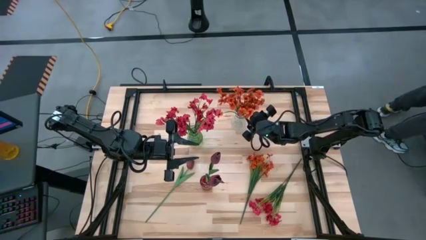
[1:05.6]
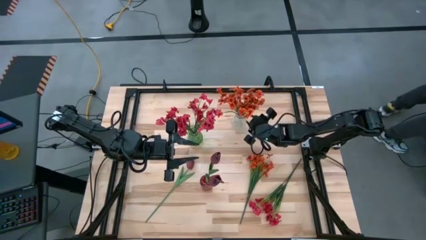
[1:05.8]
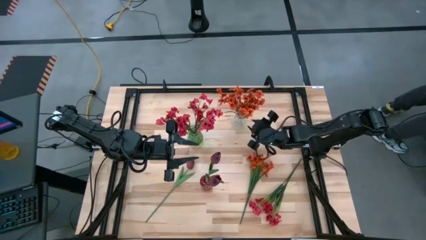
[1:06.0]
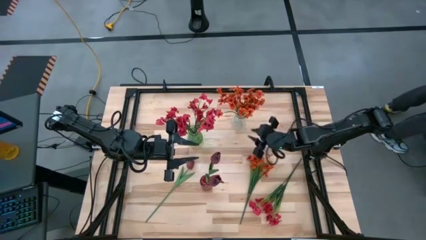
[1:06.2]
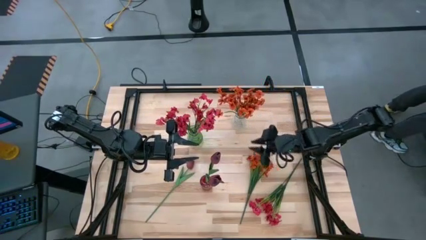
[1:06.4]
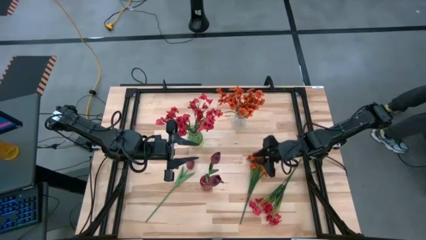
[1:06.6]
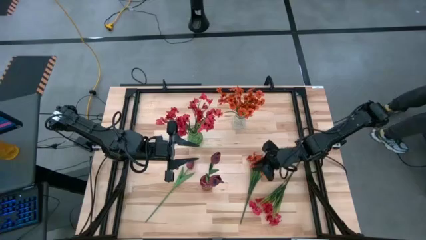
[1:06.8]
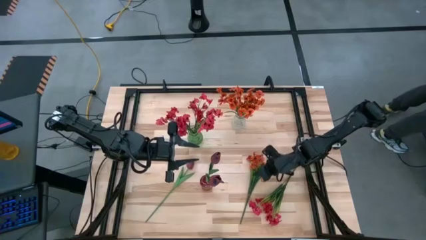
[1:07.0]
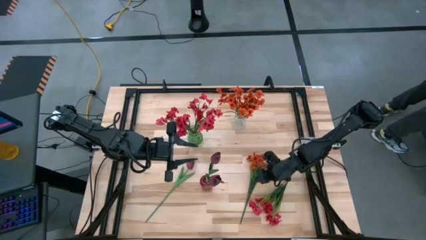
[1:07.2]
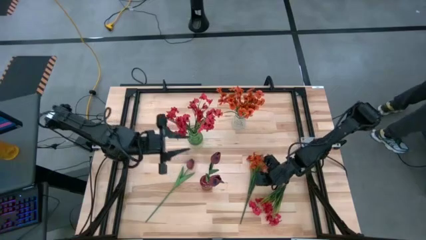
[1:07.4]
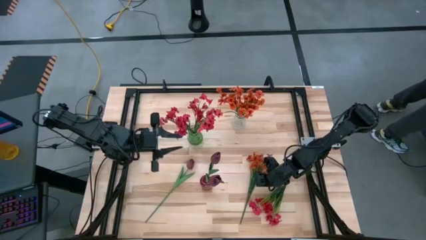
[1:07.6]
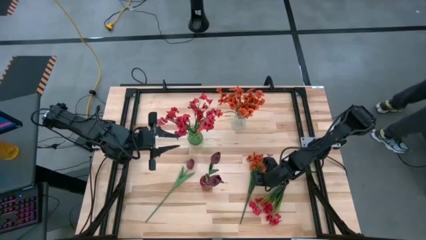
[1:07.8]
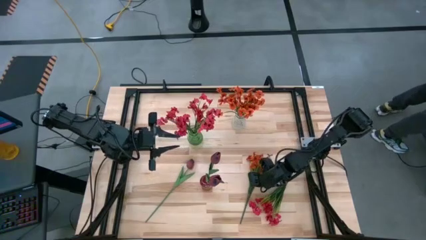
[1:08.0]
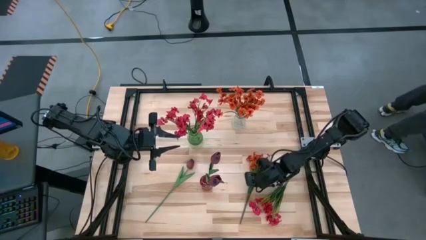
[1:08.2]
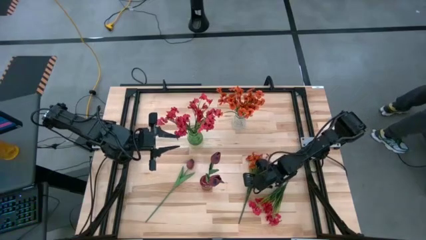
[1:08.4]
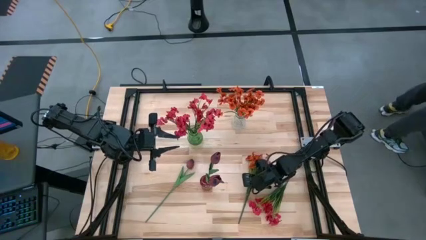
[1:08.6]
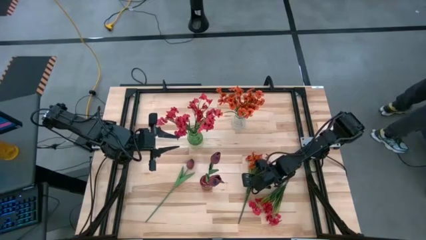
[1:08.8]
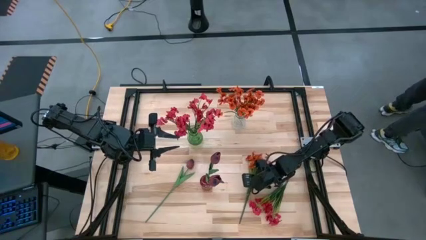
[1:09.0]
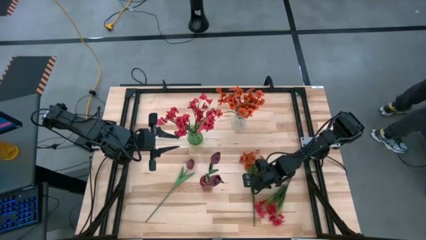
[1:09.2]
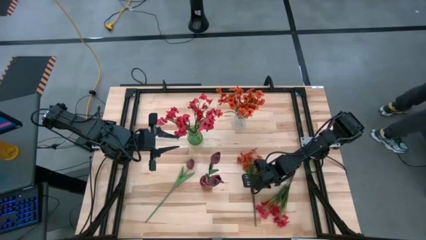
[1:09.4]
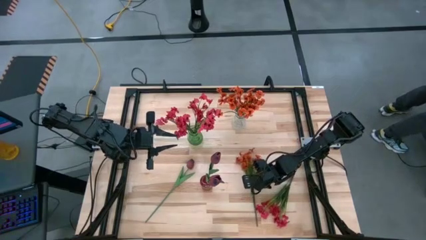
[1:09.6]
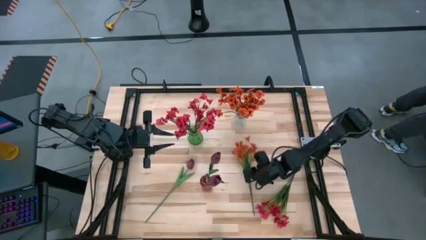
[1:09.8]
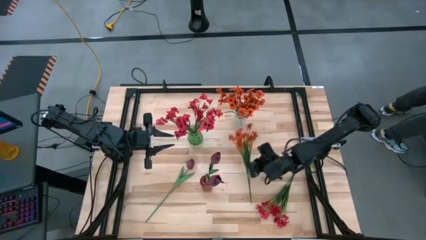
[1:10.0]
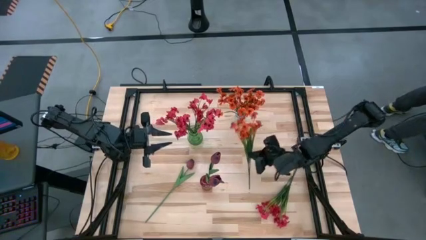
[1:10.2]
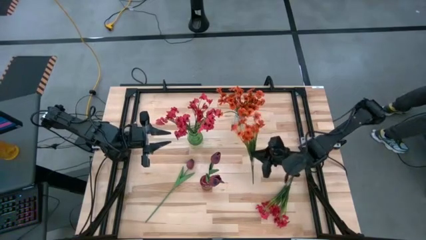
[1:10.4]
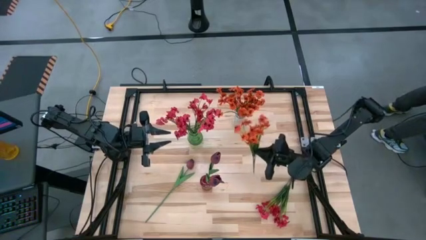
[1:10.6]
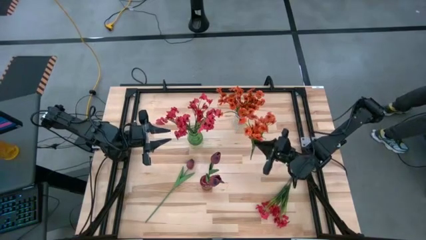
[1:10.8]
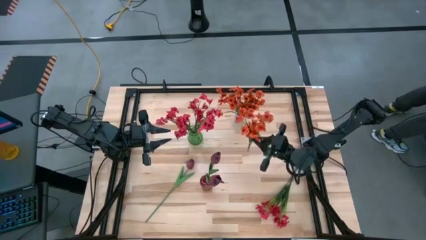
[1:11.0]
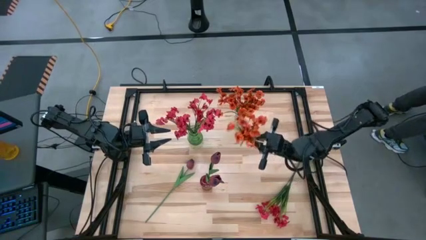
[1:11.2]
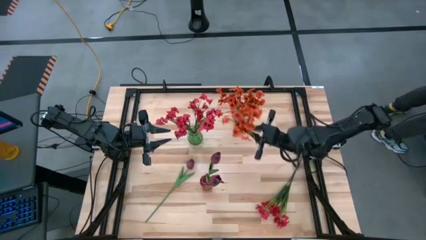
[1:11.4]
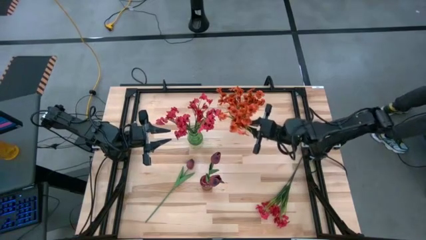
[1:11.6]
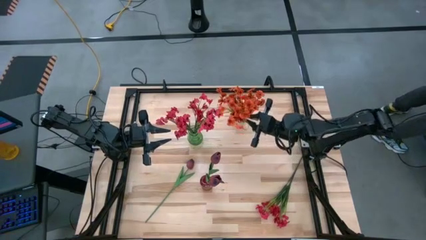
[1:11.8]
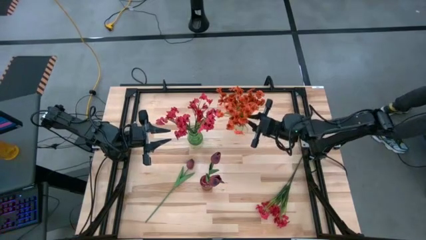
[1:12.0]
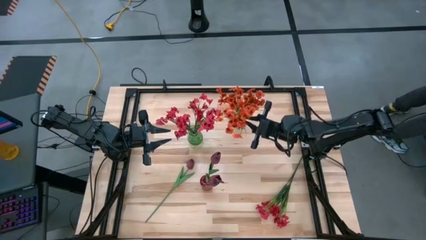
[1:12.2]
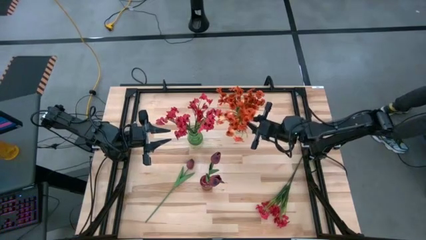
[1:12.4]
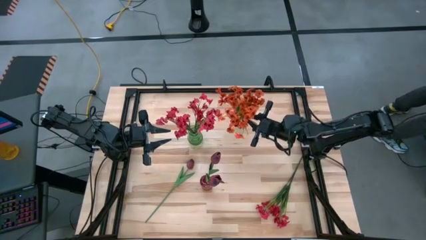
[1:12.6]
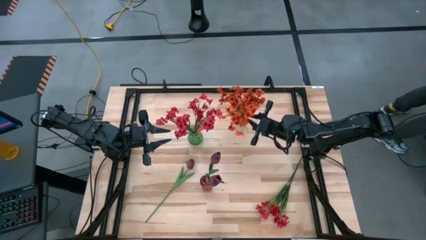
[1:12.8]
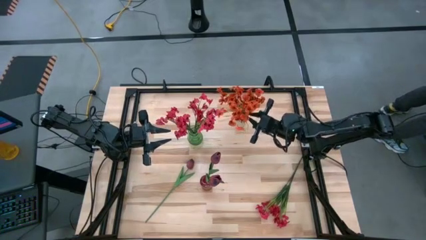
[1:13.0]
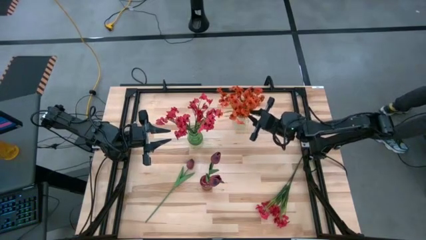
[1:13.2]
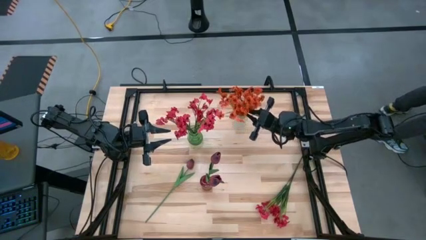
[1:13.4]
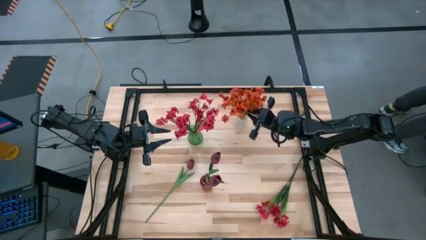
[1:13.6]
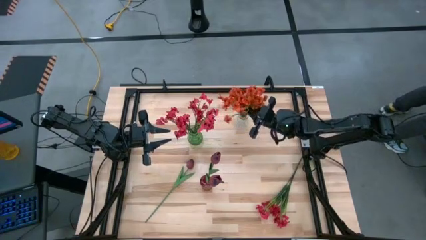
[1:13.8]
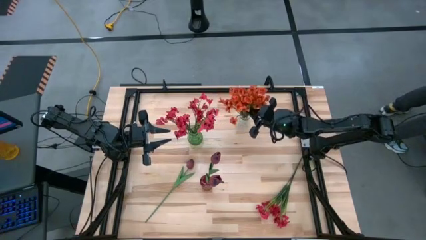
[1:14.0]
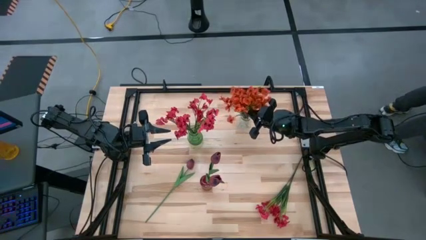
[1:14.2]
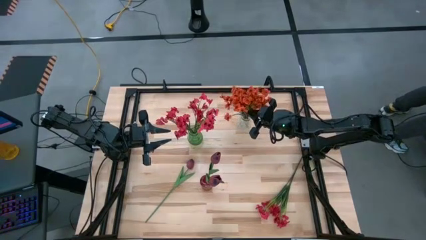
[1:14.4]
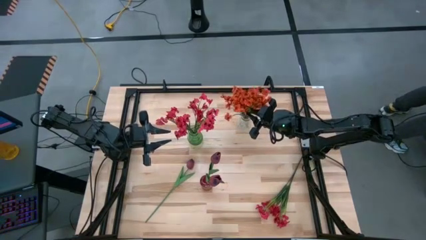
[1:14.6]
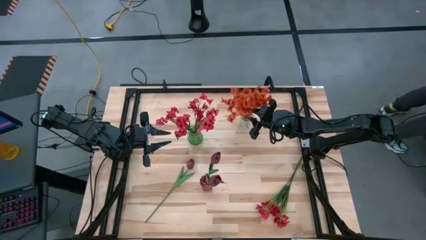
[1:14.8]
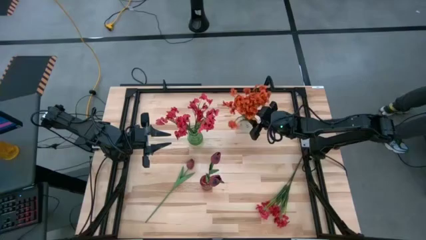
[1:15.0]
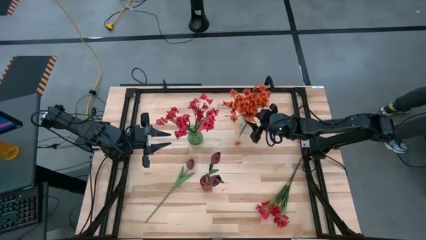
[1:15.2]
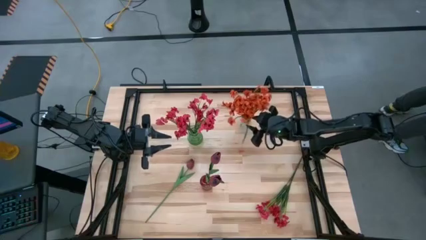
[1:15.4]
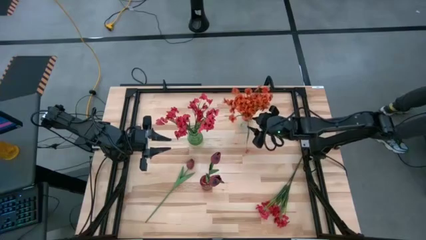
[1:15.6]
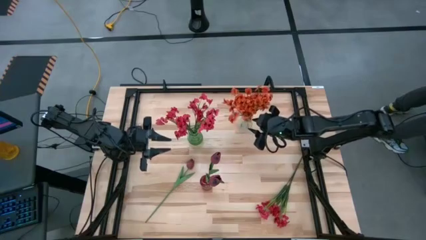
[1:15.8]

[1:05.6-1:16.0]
Task: Sort flowers into vase by color
Put the orange flowers into the transparent vase

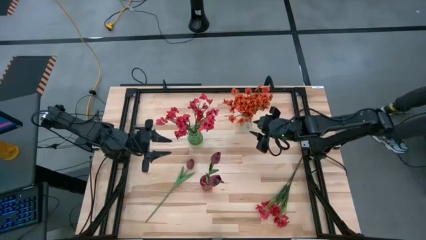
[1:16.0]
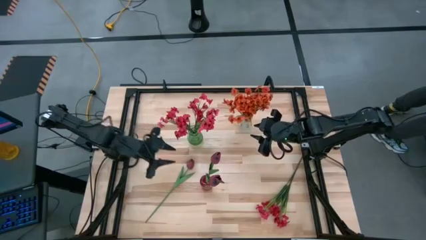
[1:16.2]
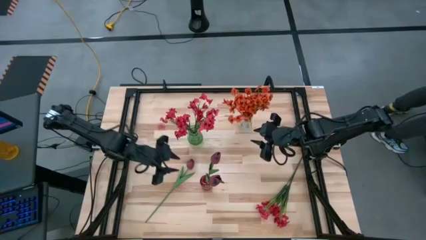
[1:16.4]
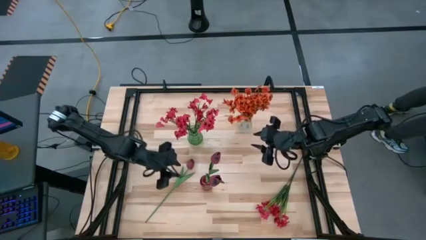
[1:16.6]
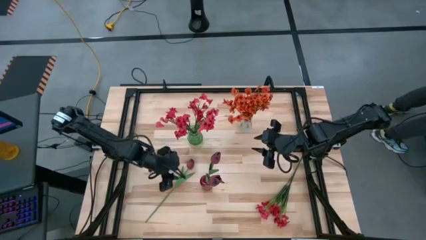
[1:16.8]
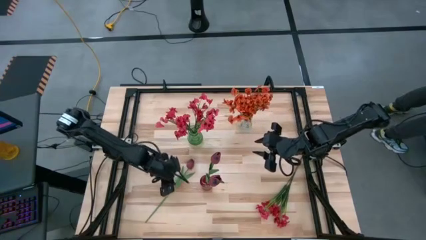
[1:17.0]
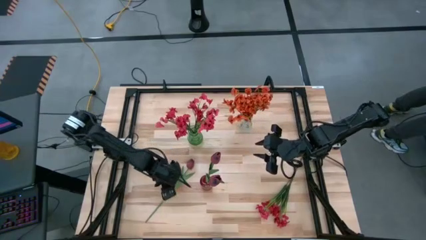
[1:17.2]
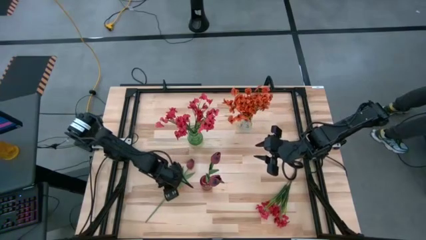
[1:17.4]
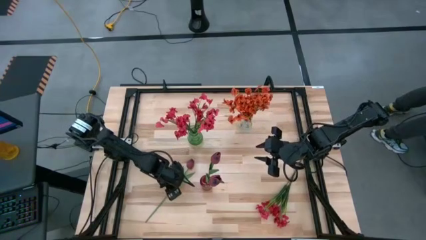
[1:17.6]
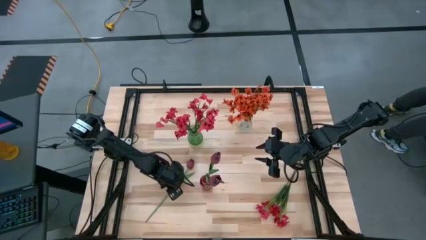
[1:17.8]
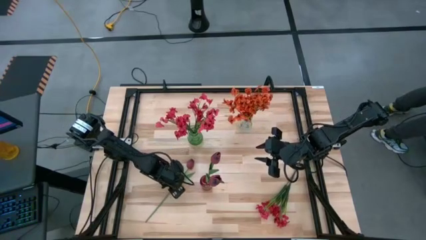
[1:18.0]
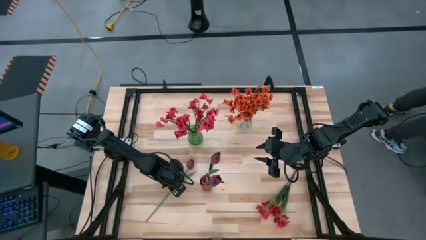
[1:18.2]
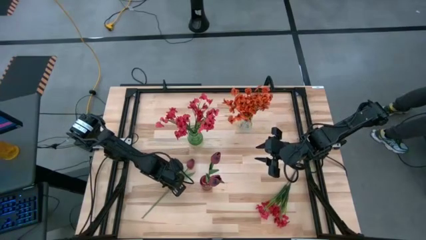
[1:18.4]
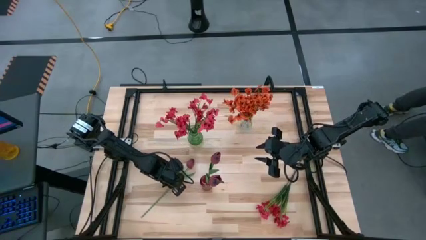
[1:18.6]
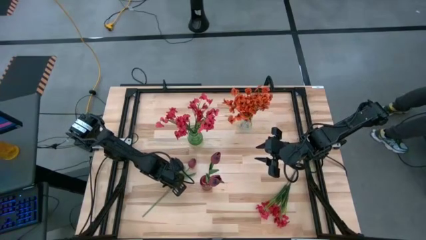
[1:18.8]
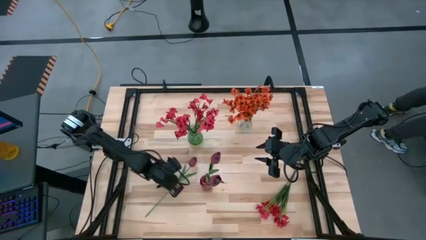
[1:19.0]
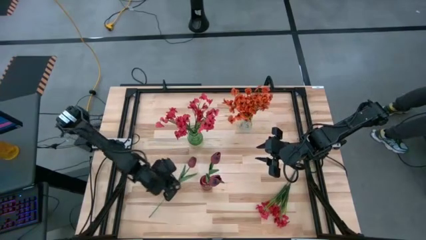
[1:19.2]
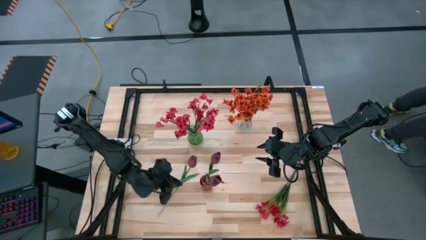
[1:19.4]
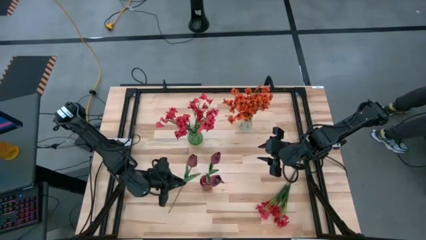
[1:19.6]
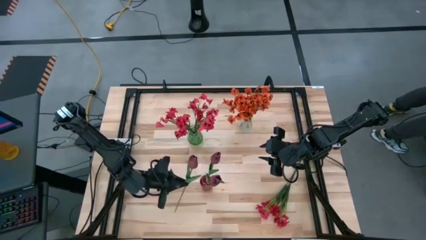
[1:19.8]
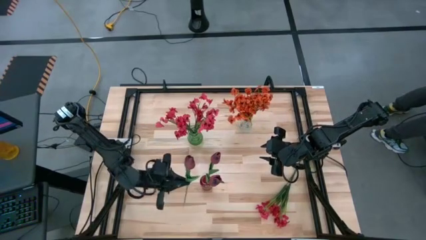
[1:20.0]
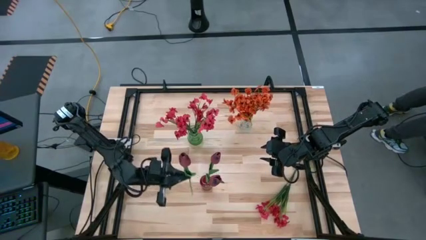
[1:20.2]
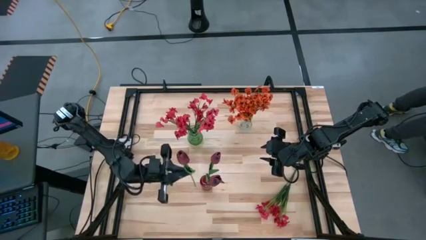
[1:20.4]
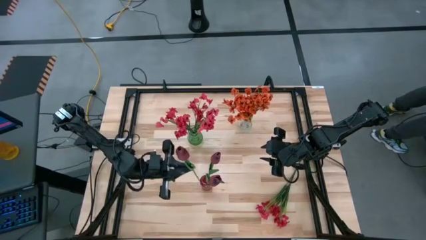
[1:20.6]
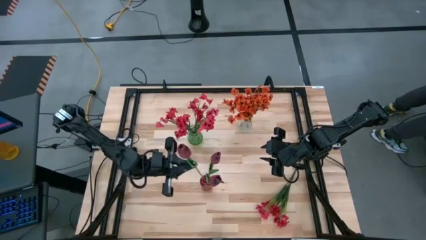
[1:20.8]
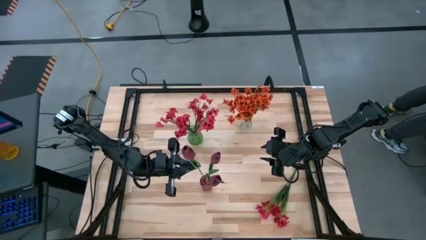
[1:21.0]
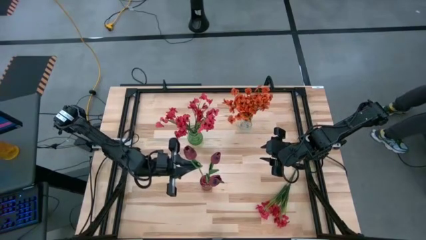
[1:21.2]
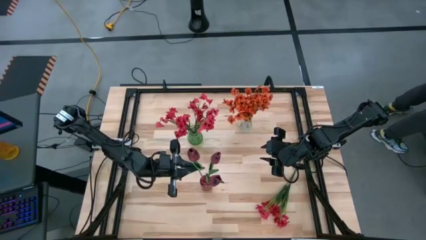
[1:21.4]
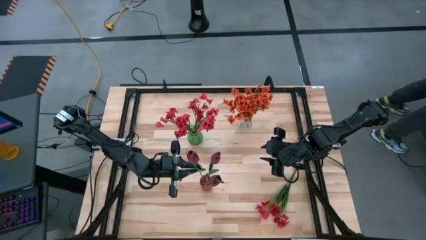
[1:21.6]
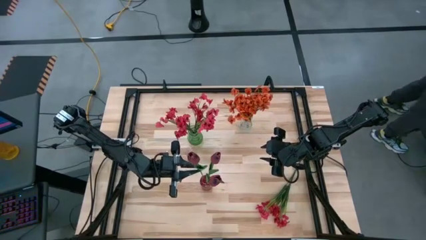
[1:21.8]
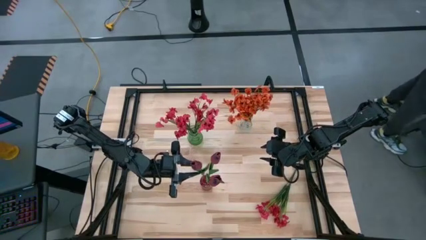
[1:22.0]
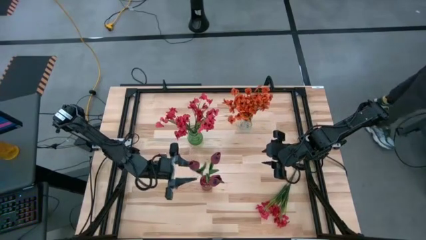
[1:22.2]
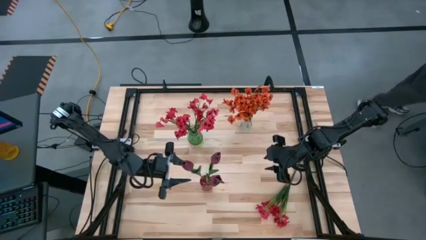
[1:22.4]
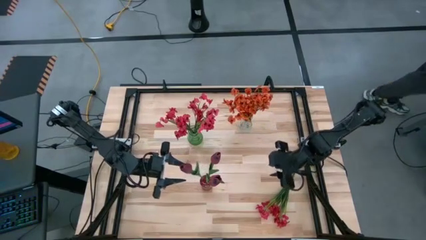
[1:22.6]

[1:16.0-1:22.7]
Put the red flower into the red vase

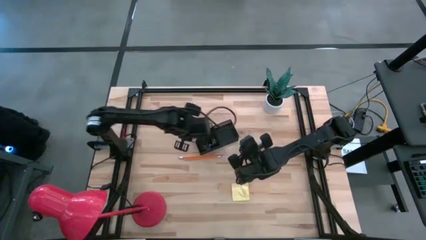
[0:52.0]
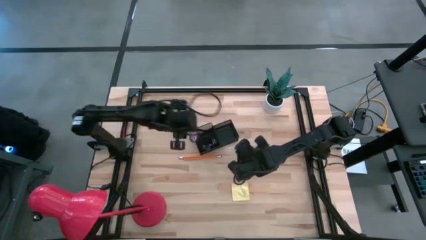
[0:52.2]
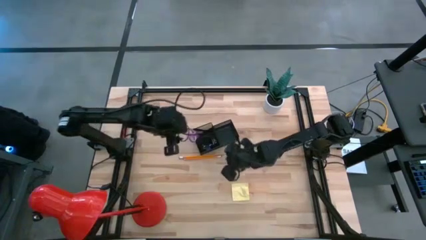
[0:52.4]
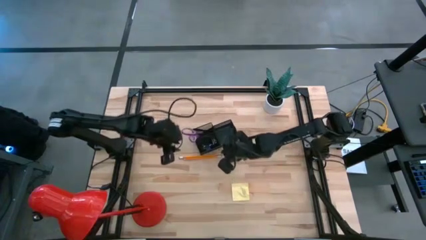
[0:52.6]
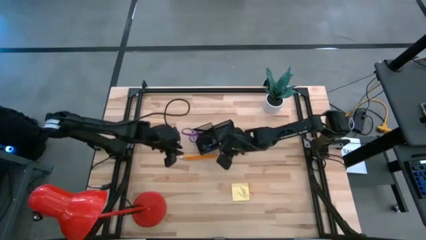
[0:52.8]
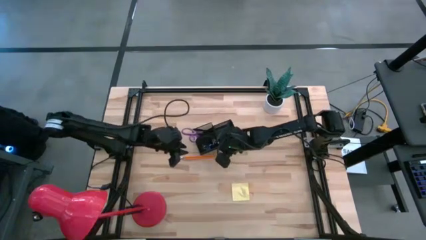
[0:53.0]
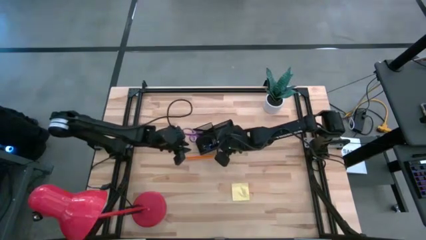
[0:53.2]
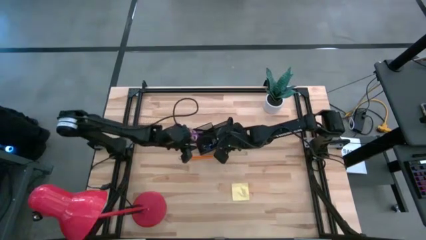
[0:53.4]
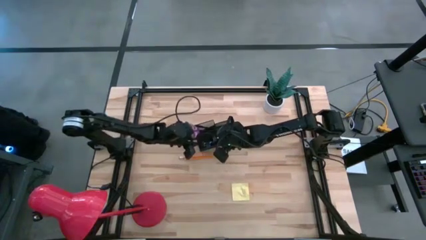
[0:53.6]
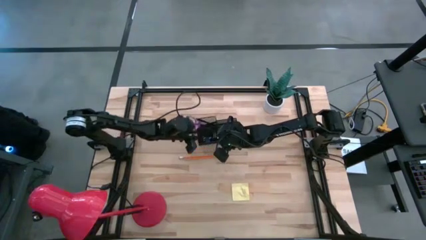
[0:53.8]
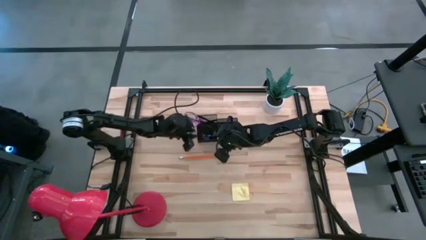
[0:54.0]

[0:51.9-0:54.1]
Task: Pick and place office supplies into organizer
Adjust the black desk organizer
